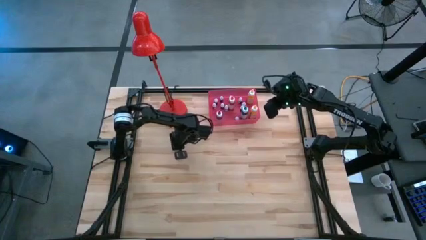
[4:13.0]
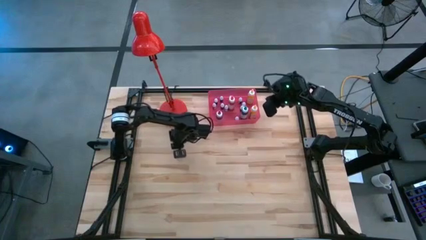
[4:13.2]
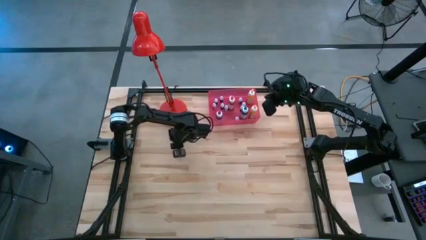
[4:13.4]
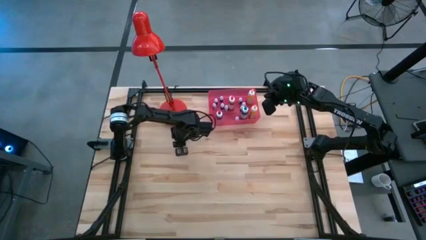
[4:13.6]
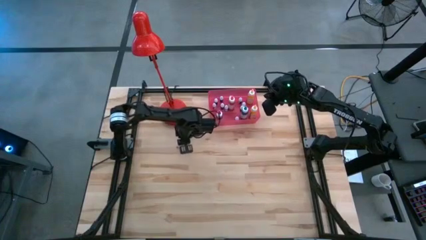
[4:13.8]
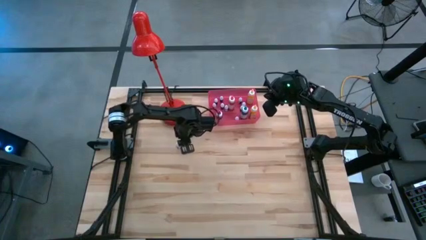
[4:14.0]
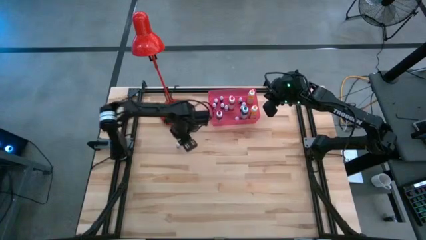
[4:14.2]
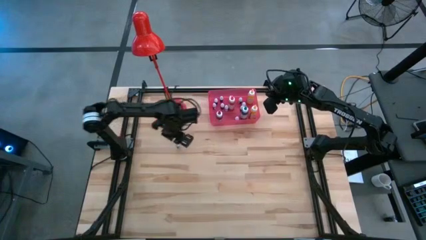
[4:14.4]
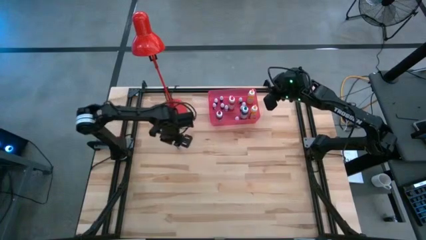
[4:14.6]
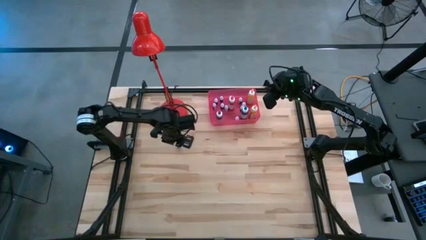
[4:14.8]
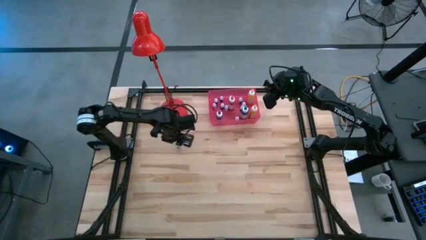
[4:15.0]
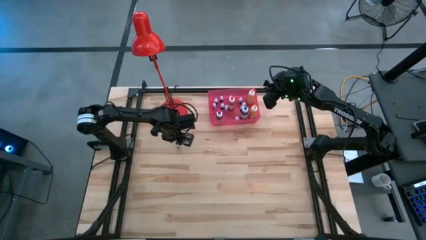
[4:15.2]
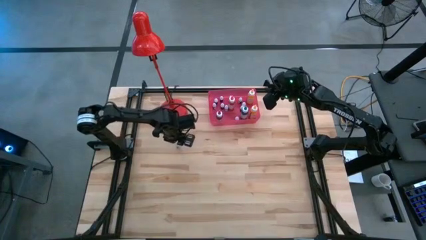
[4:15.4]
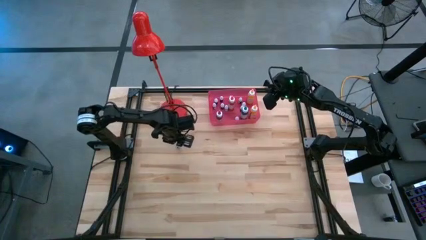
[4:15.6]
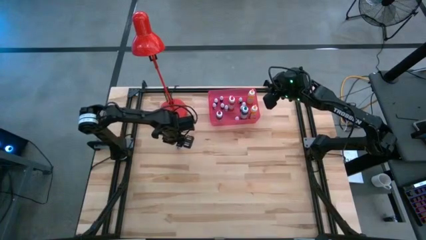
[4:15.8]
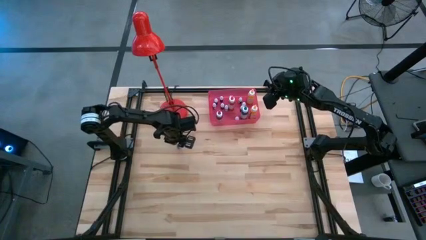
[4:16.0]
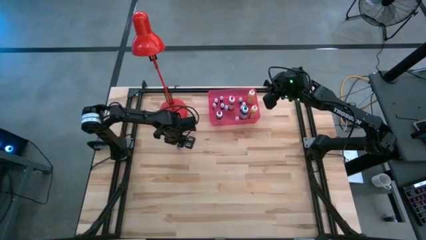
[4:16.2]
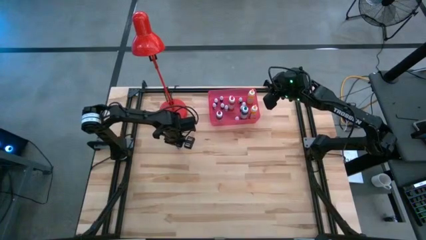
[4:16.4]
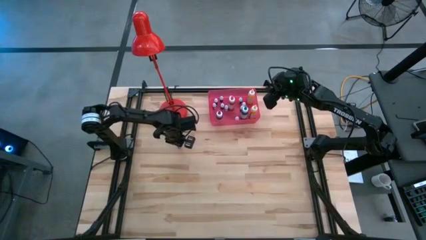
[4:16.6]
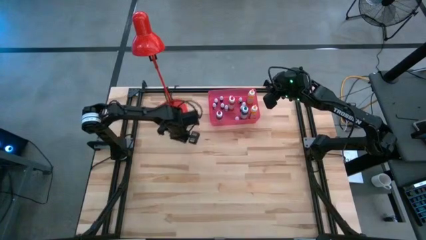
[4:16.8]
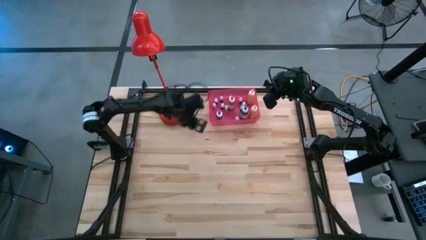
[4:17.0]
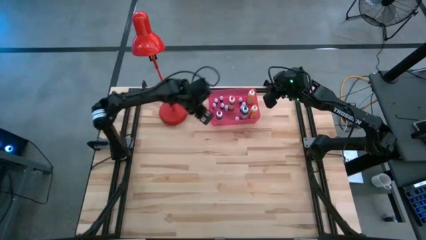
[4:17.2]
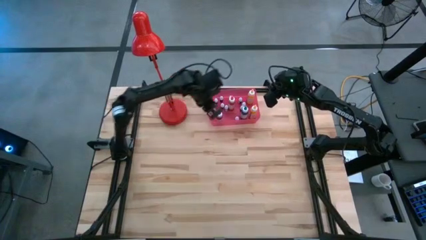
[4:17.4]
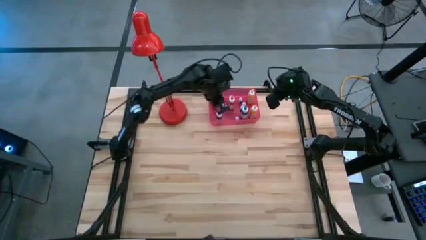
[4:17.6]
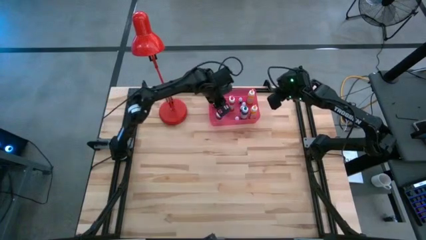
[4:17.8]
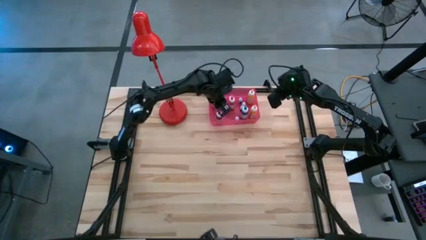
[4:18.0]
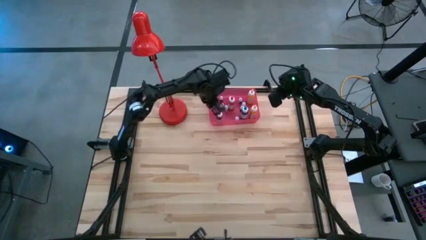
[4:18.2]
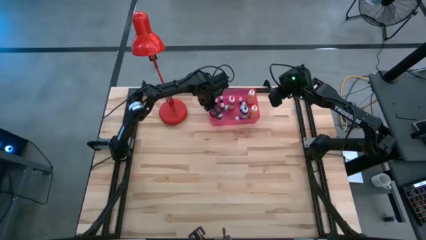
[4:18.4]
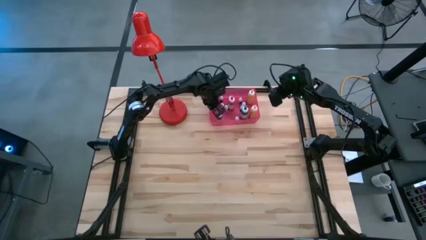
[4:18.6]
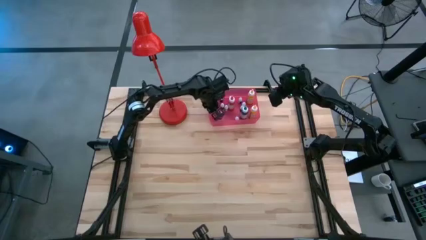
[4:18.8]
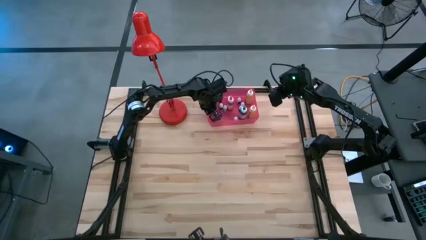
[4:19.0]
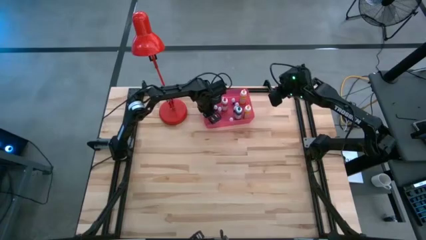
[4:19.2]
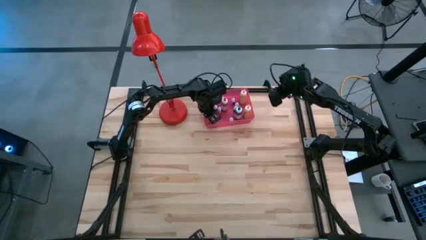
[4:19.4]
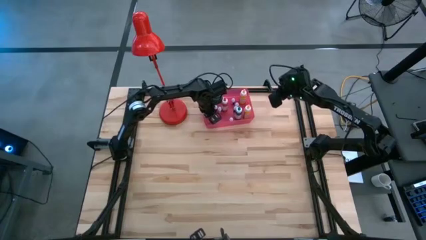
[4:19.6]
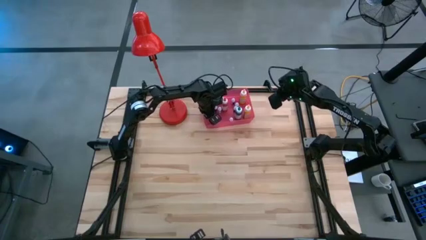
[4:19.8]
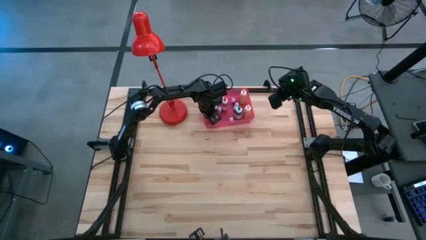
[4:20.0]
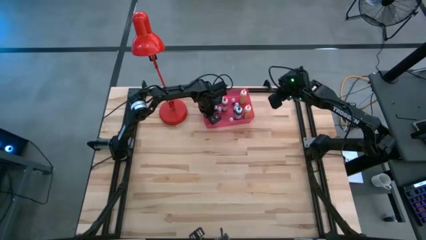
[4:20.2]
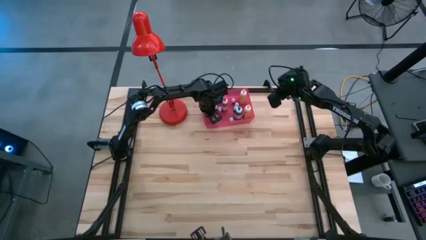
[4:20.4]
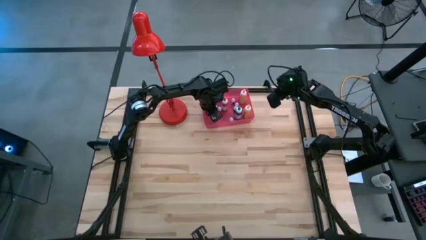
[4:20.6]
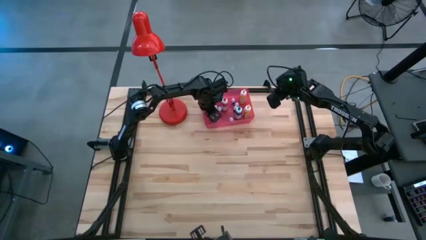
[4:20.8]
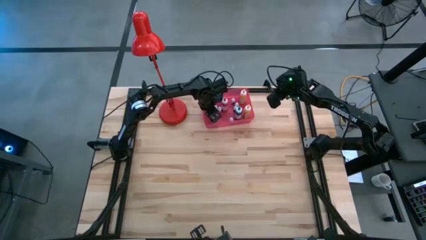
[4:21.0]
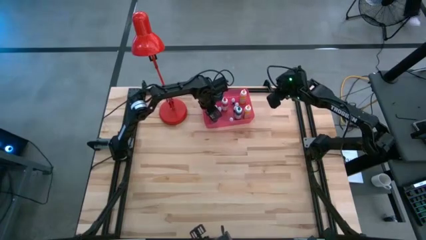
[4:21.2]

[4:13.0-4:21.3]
Task: Pick & Place food coloring
Put the small blue food coloring bottle into the red bin

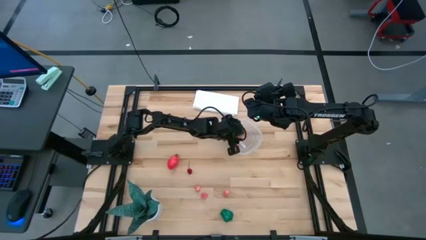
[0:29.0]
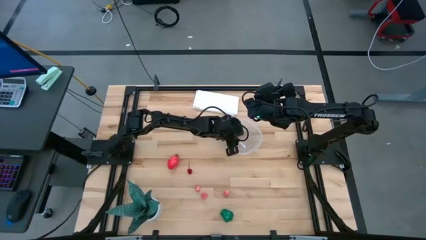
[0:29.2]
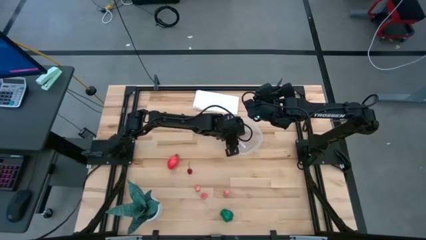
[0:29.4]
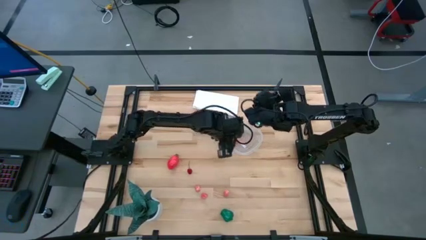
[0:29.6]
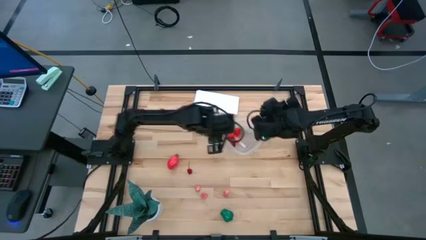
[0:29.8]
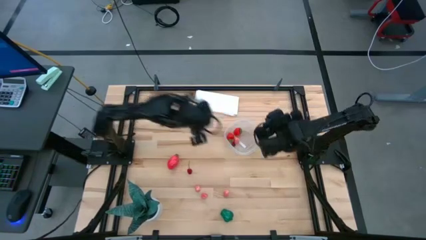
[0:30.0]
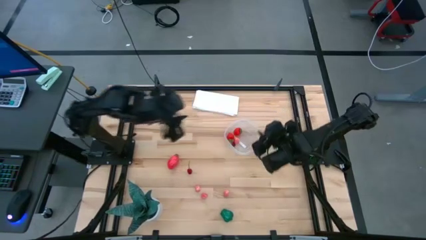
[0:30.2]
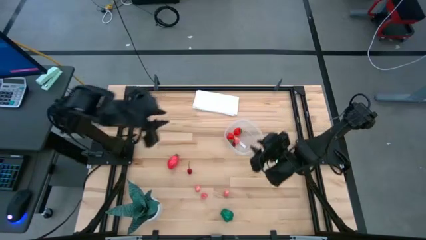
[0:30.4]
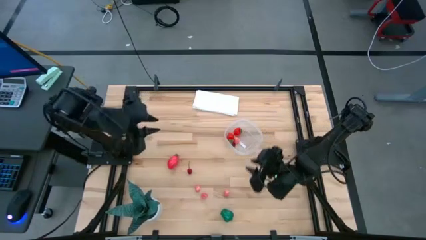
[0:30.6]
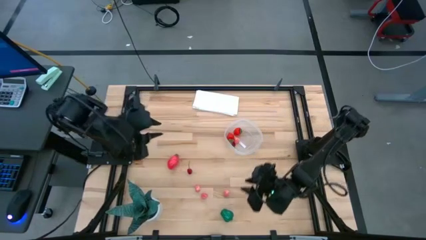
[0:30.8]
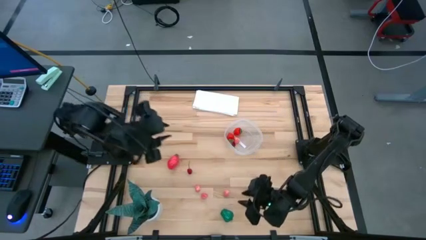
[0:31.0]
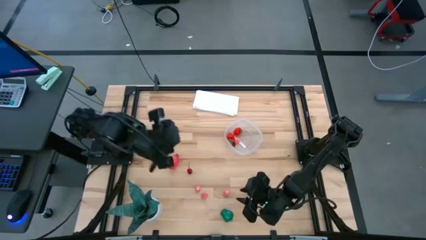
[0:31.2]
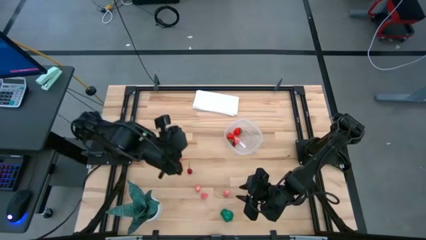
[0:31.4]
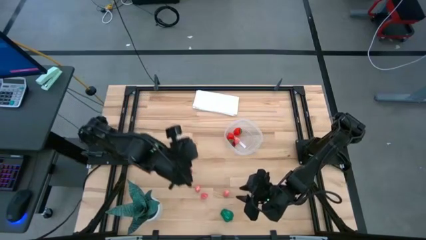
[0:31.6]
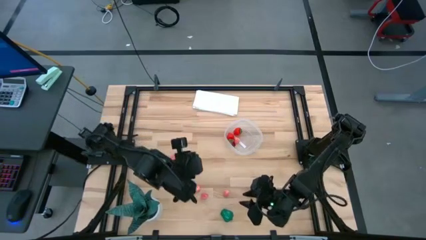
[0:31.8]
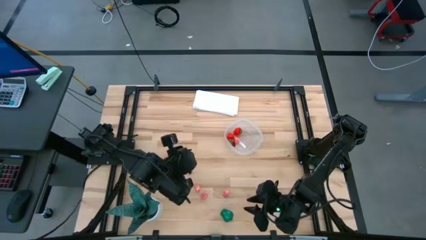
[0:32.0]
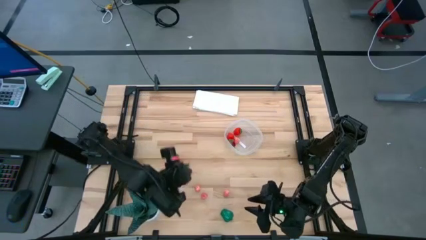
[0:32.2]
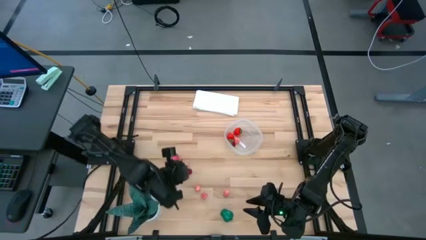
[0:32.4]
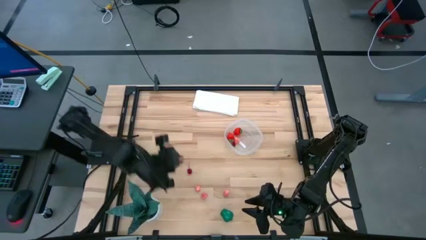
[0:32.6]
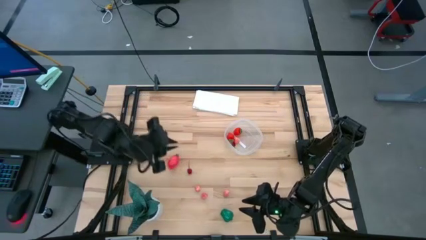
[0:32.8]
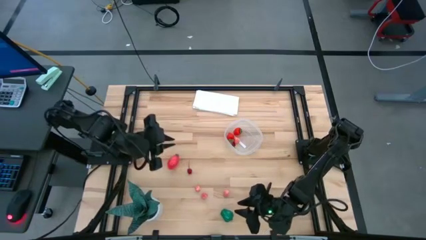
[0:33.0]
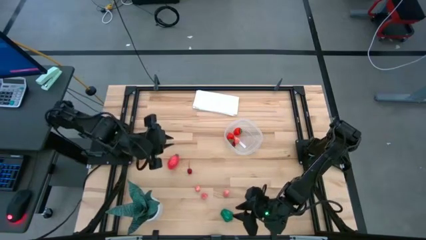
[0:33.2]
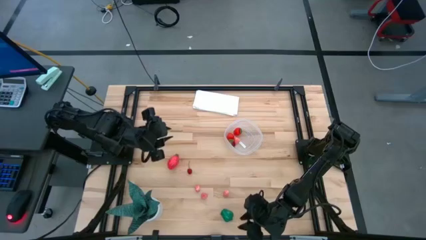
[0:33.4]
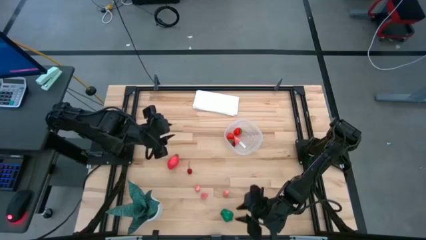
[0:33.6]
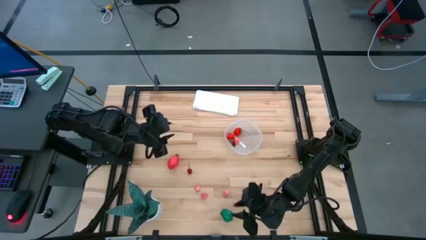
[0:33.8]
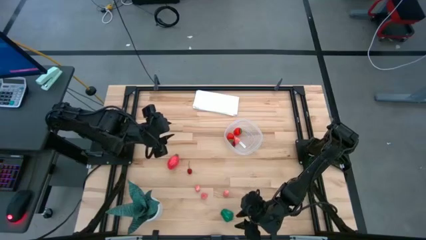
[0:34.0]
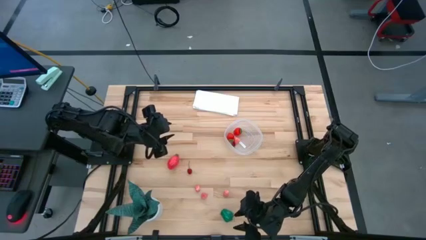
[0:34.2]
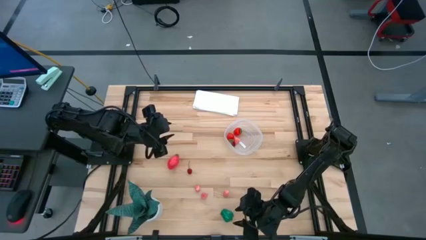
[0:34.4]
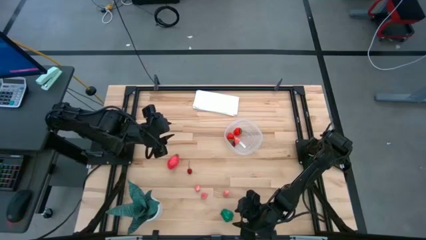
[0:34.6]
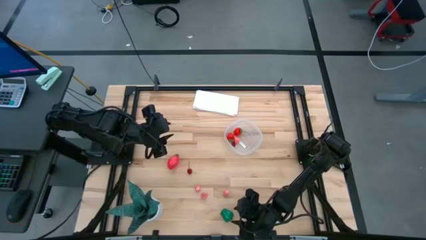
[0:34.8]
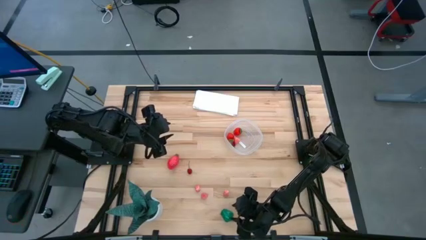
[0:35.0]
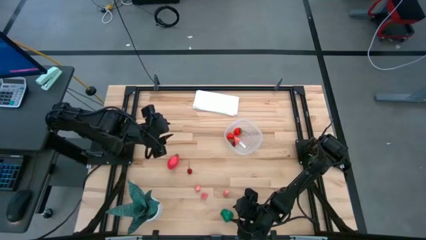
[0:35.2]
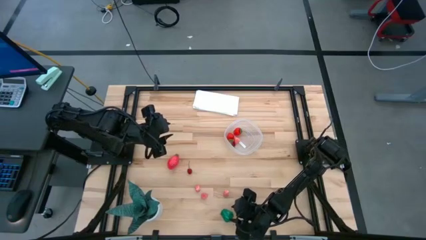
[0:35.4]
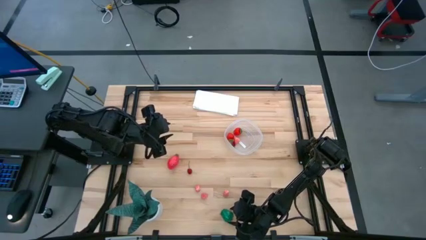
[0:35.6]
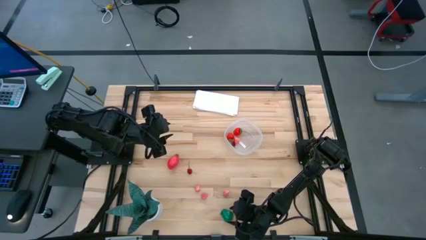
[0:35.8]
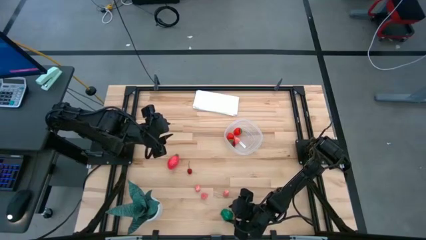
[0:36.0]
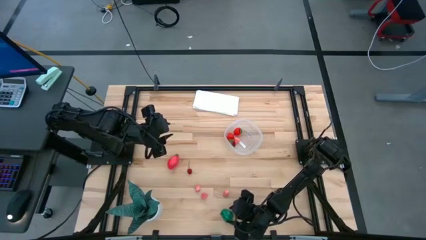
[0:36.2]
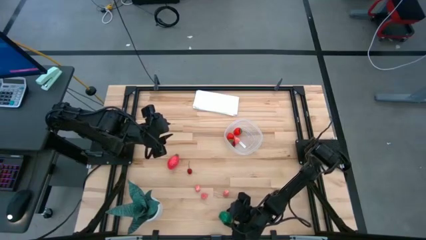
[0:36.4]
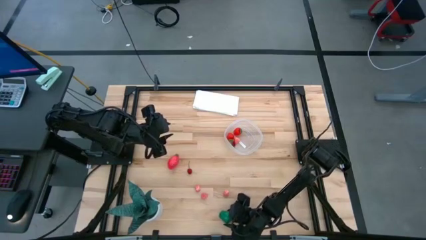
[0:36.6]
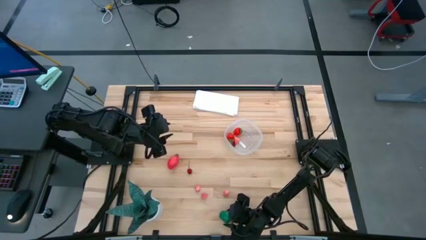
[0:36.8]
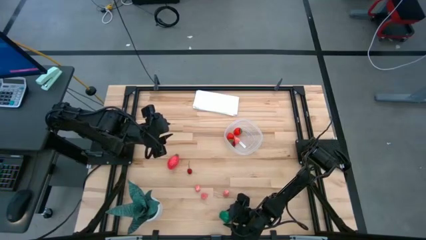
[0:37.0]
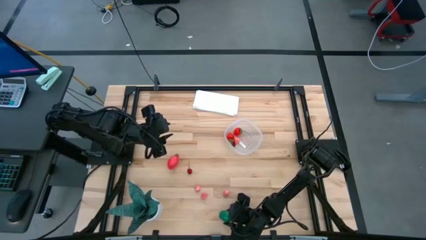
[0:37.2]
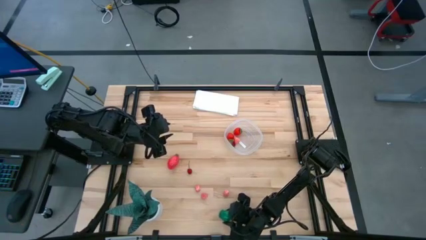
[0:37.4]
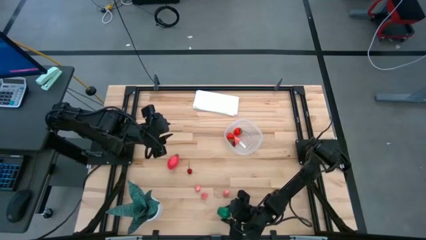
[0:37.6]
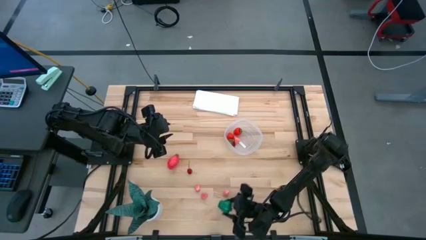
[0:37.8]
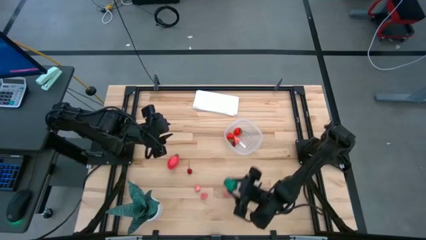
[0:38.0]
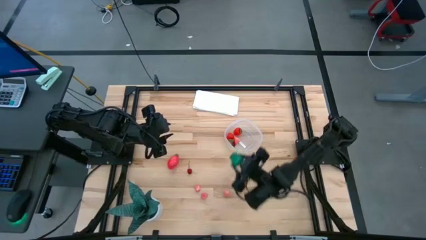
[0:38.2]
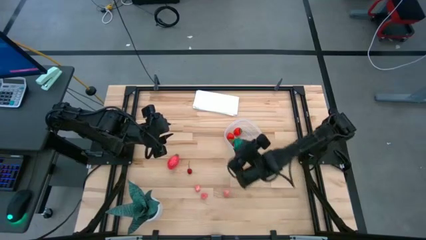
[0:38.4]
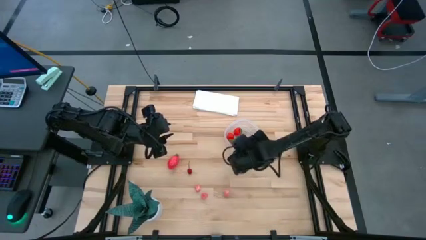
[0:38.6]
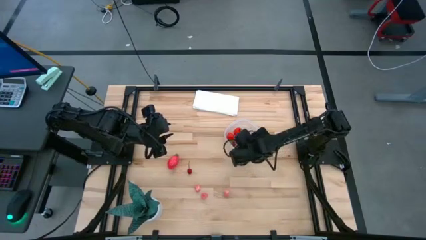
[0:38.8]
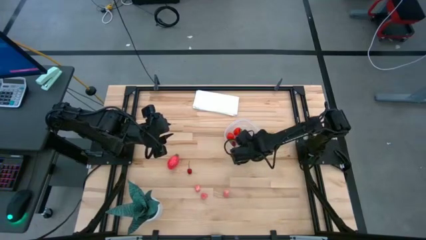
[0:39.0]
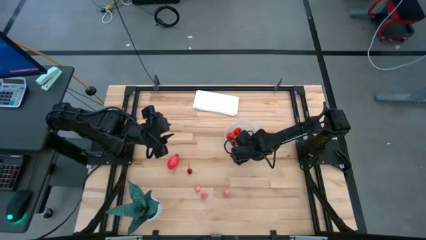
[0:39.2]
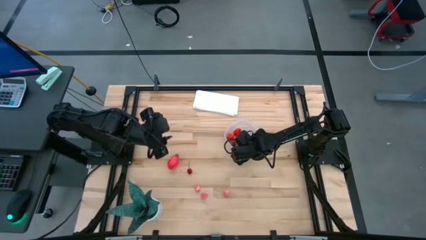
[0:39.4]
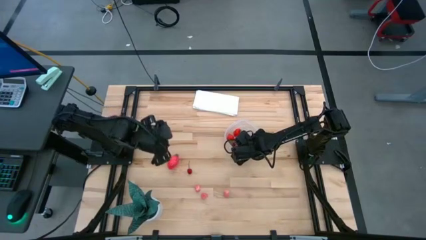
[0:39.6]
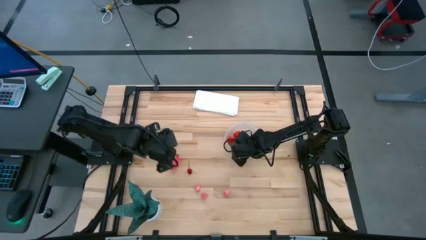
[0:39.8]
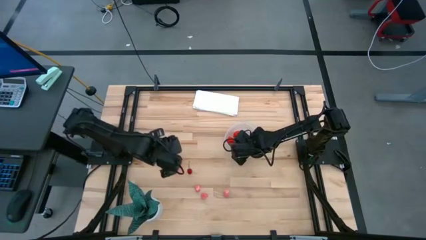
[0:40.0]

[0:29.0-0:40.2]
Task: Pick and placing Produce into tupperware
Put the green bell pepper into the transparent bin
